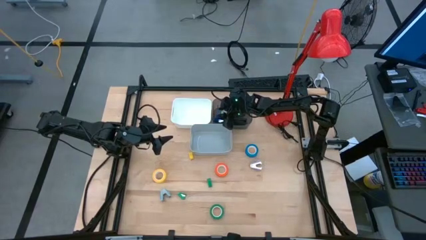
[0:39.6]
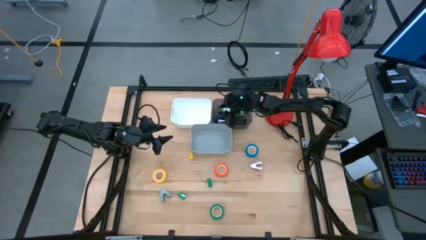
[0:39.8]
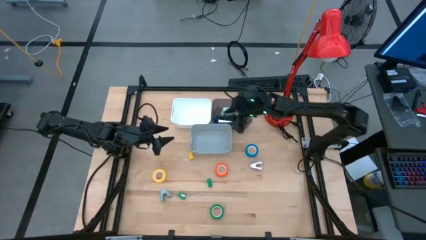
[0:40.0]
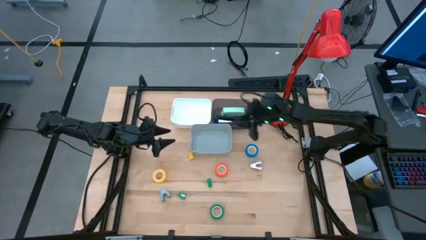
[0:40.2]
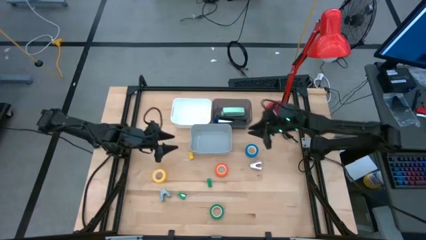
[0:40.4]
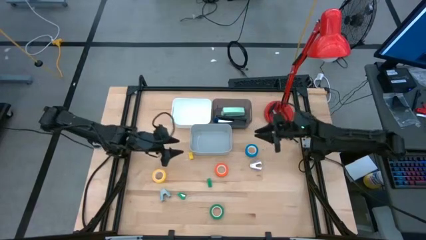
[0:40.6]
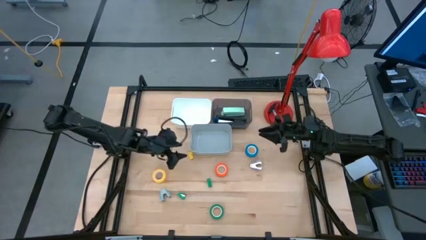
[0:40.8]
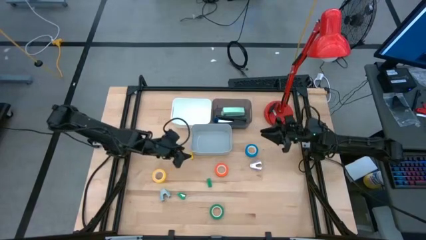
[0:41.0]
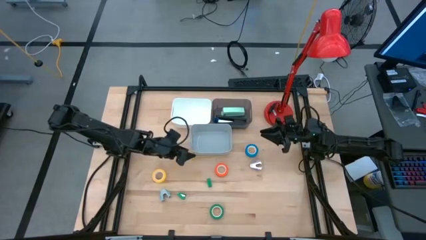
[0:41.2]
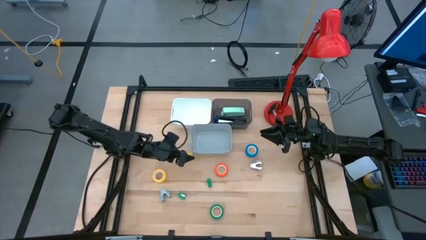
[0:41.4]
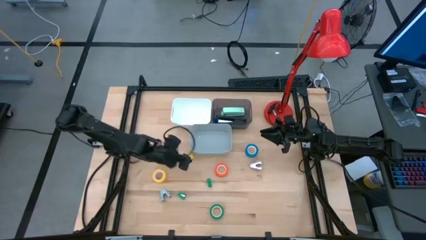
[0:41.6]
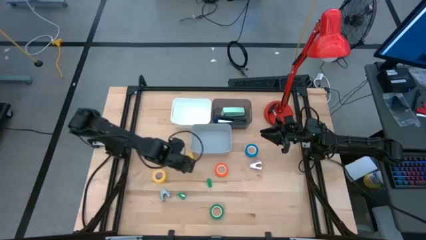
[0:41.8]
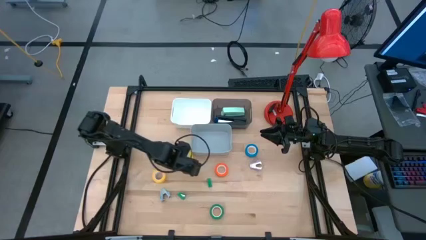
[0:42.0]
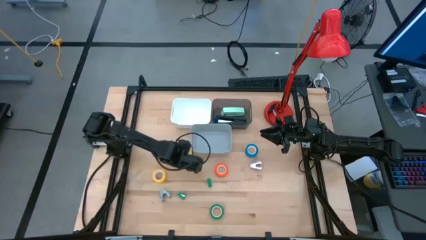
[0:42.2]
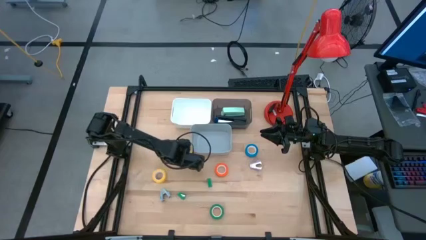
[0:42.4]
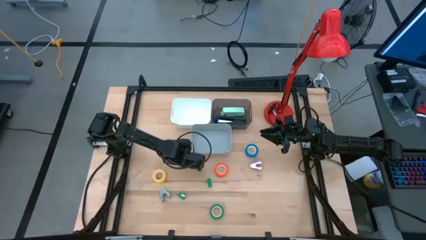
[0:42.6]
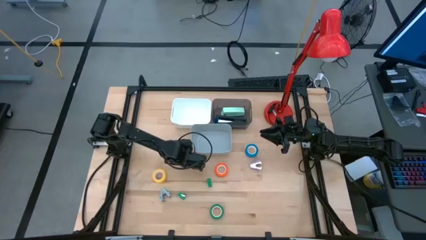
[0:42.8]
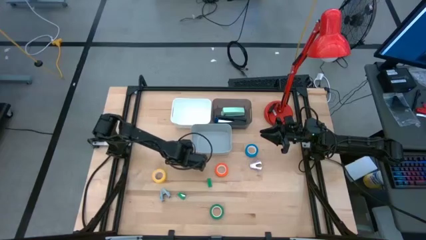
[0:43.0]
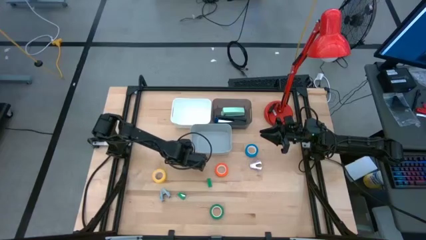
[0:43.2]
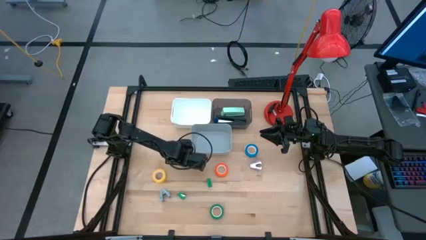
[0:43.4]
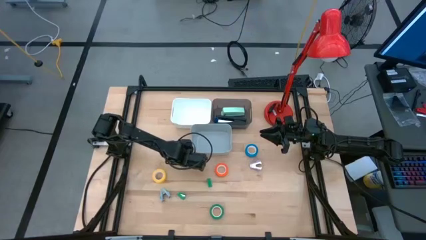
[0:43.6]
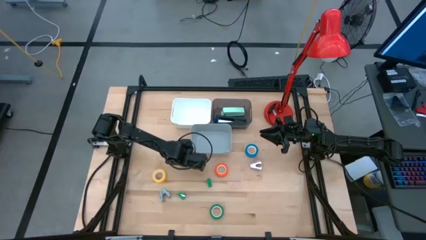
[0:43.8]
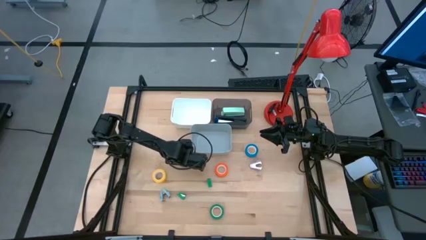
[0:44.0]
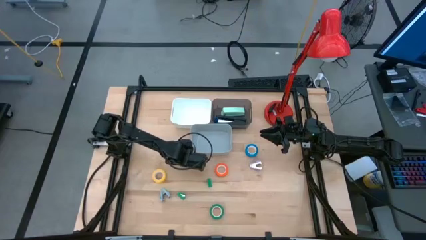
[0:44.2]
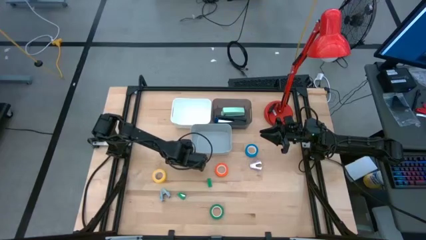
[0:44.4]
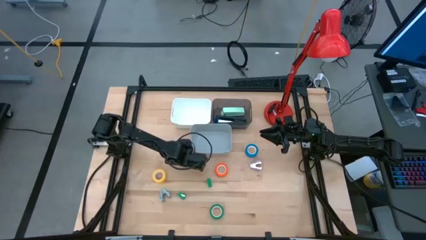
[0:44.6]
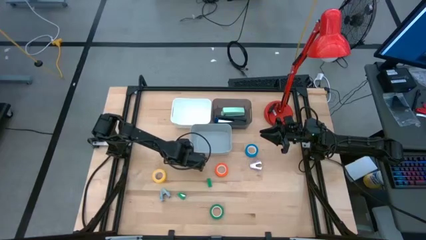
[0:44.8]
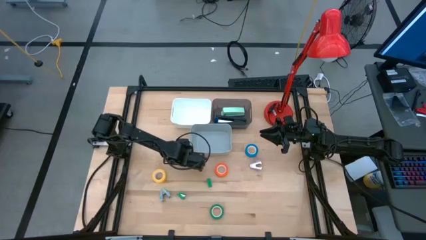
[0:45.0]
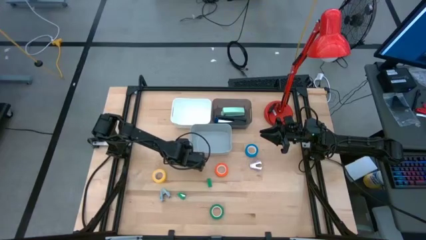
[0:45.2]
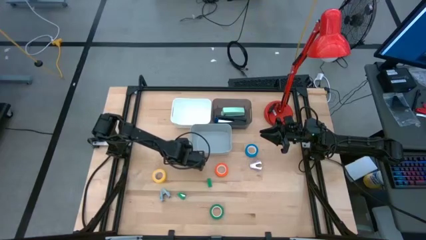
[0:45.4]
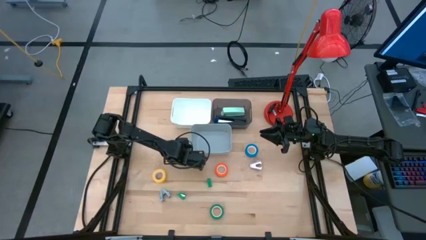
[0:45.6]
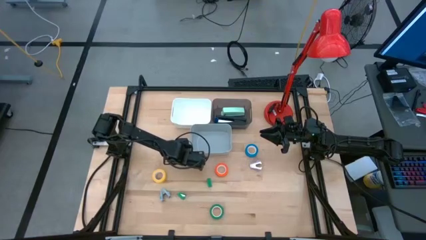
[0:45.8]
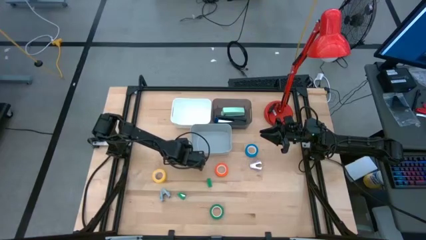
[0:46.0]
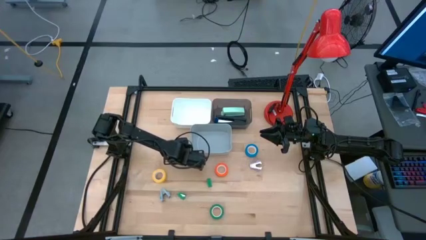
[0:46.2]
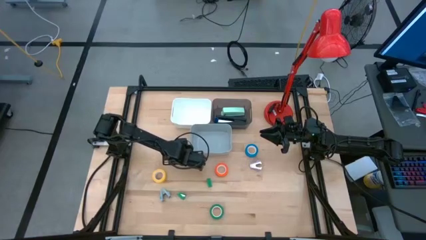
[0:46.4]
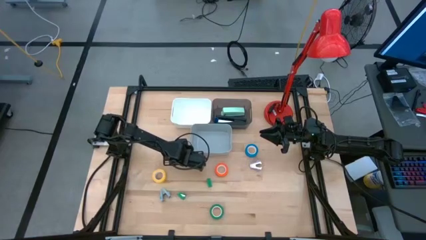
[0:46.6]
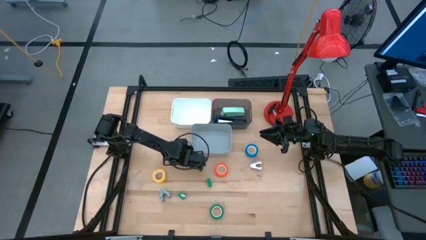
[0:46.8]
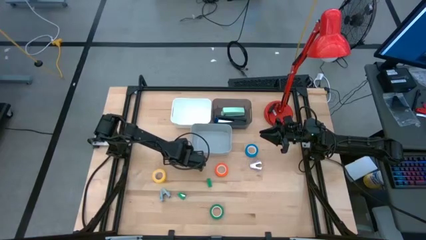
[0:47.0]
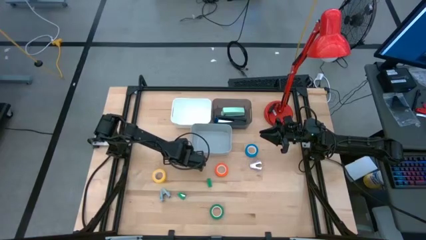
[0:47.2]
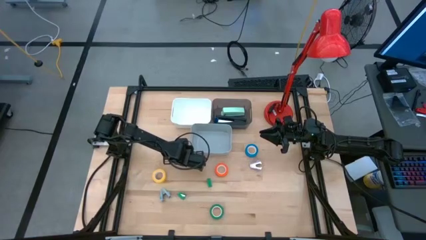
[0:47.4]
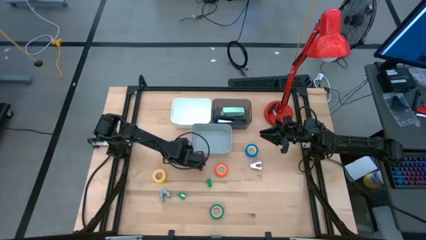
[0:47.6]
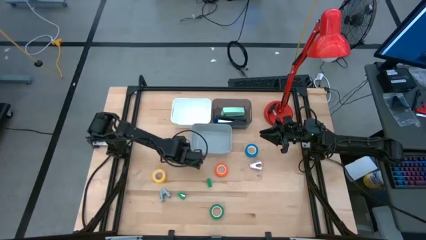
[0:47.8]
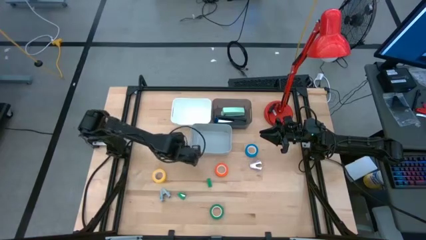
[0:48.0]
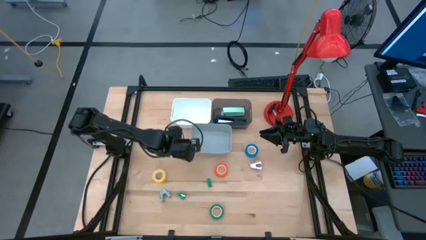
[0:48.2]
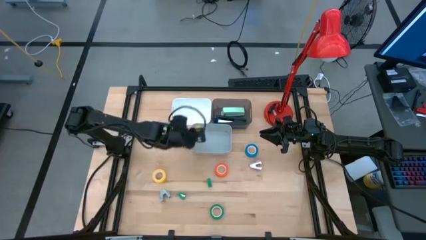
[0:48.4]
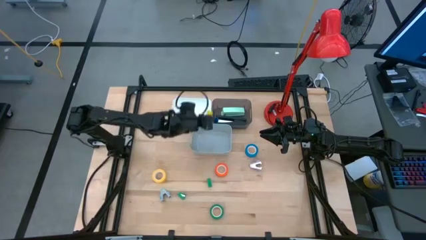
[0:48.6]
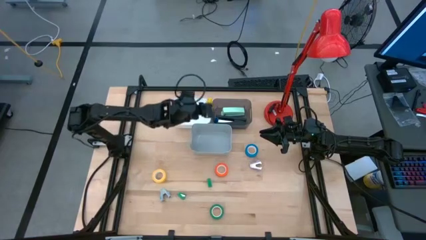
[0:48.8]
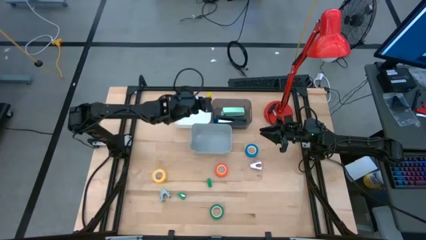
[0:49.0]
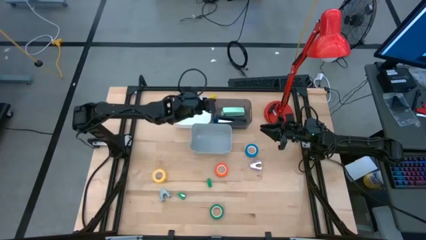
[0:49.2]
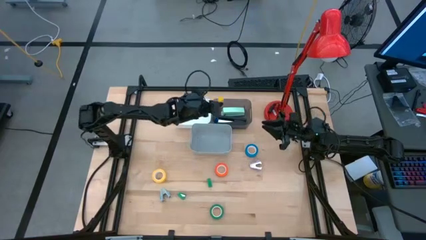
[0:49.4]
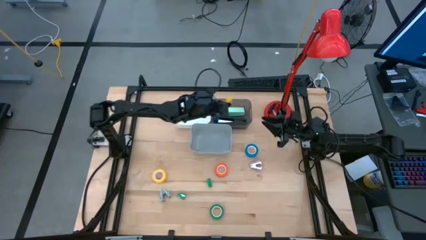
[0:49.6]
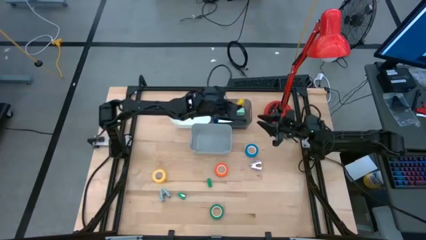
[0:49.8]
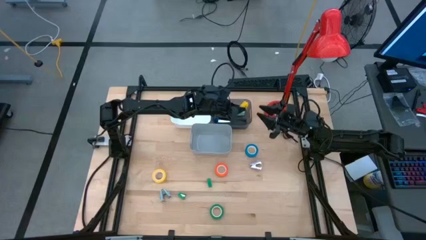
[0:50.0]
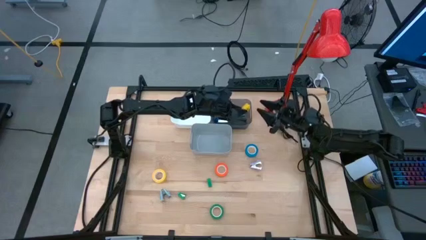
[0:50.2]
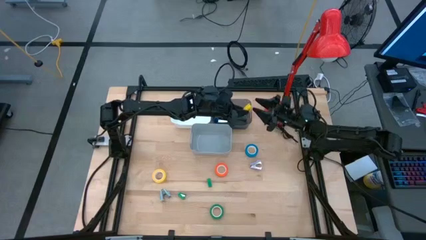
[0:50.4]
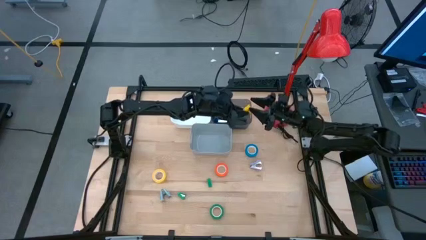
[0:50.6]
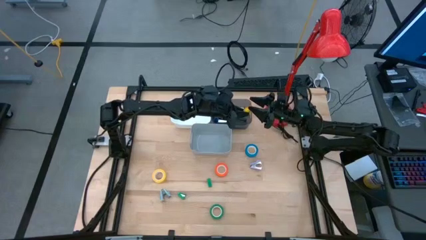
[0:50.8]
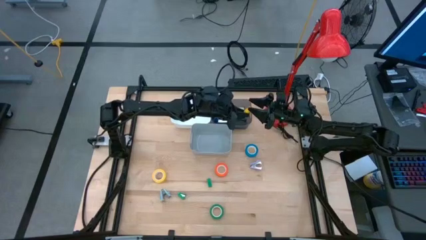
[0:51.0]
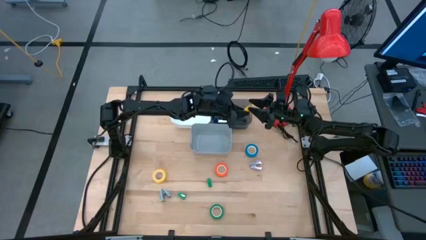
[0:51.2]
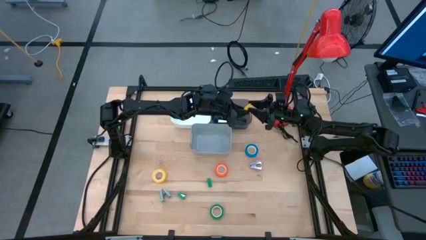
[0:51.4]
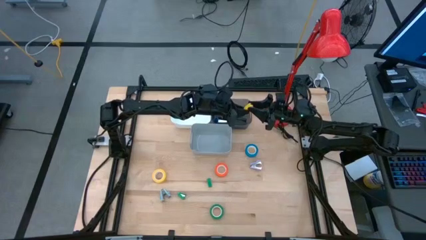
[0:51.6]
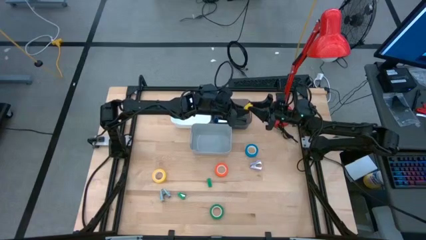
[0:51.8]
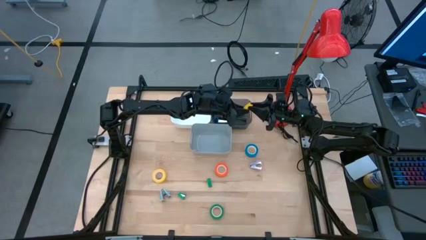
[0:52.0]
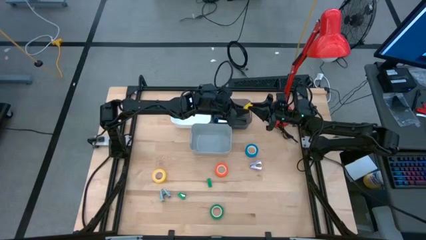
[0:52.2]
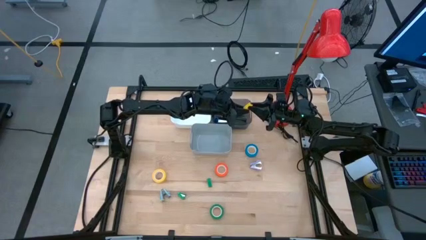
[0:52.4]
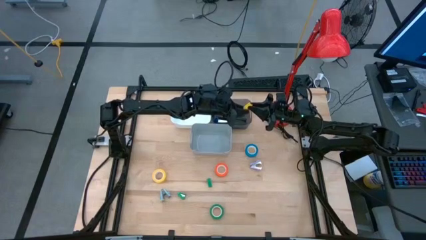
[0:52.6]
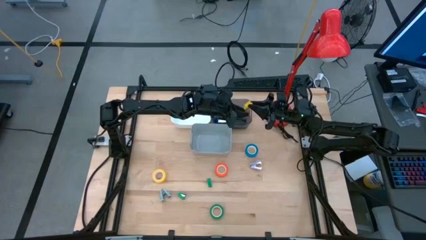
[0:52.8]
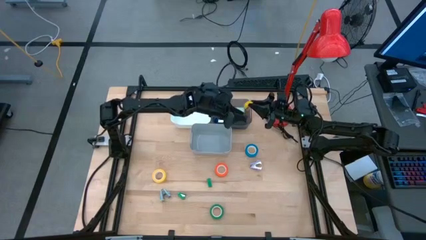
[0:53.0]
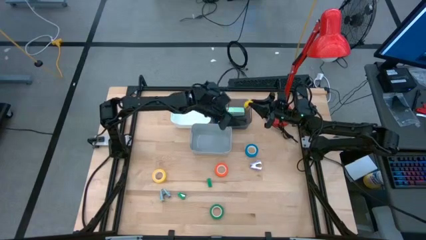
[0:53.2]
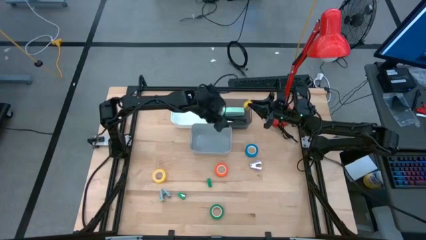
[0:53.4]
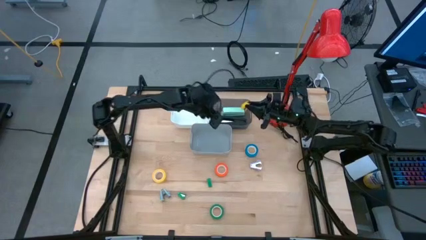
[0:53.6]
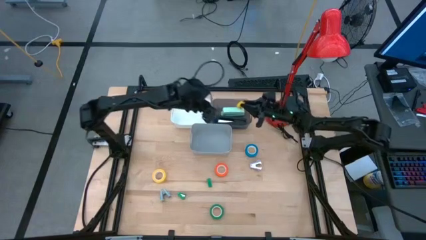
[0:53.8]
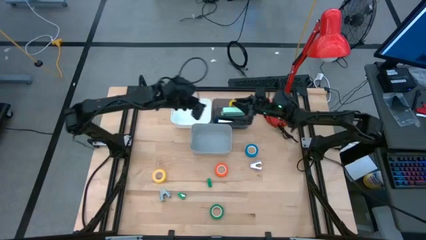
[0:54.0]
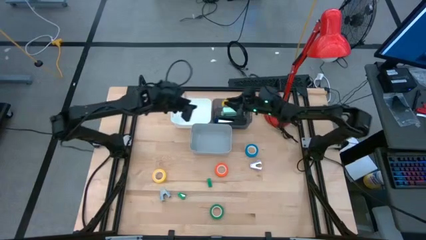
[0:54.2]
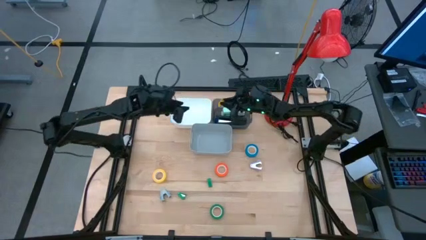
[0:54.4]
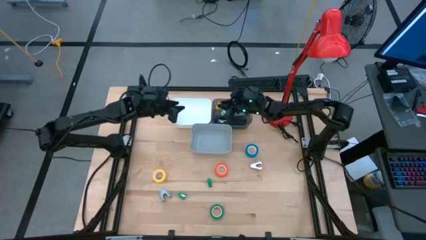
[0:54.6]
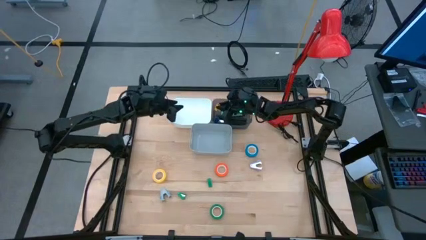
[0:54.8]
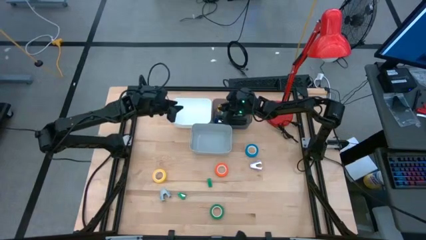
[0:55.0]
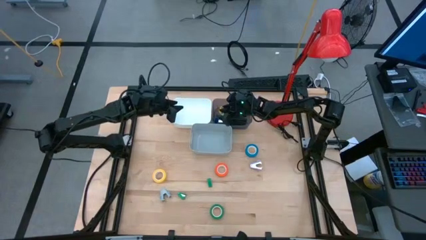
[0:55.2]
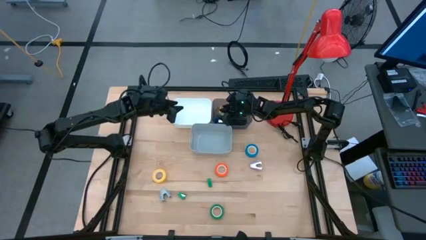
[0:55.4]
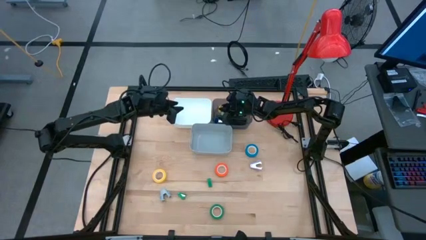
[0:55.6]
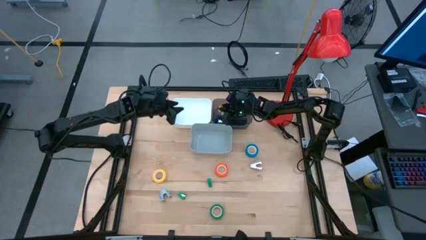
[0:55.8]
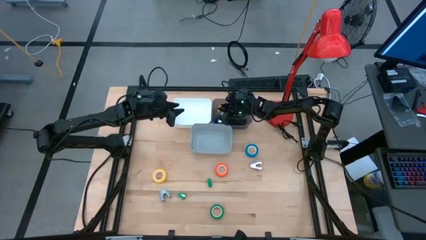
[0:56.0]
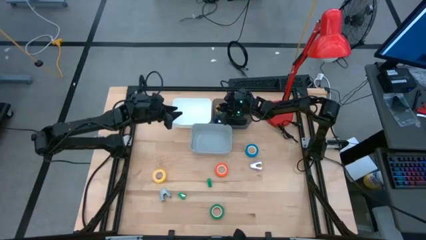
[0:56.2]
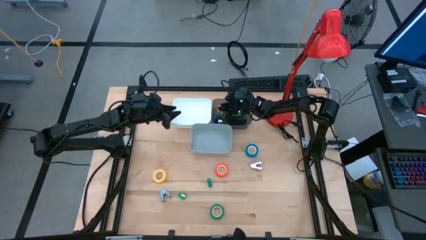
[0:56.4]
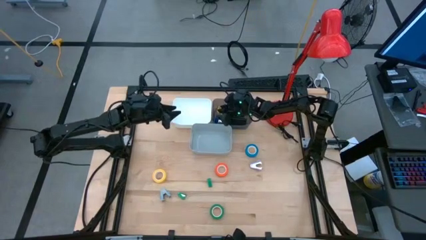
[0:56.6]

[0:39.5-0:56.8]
Task: Pick and place Stapler, Stapler remover, tape
Put the yellow stapler into the black bin
